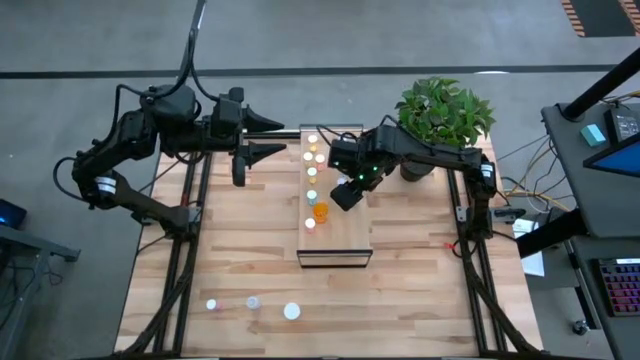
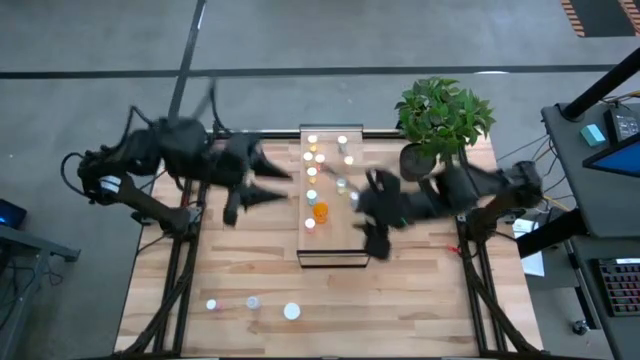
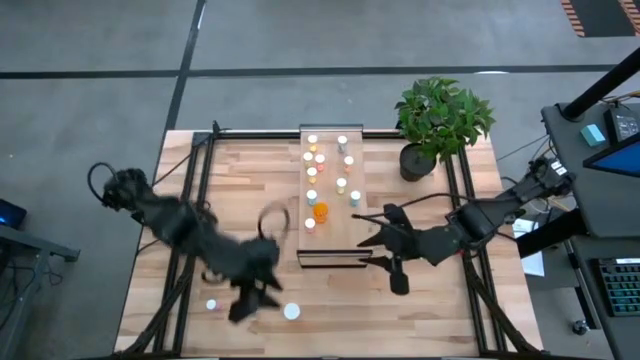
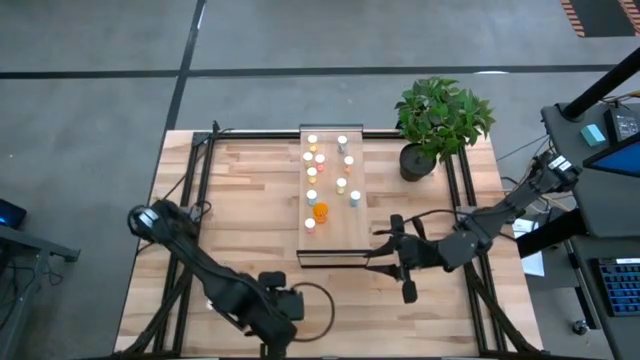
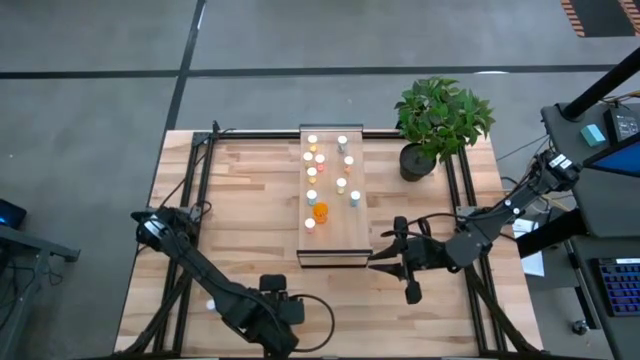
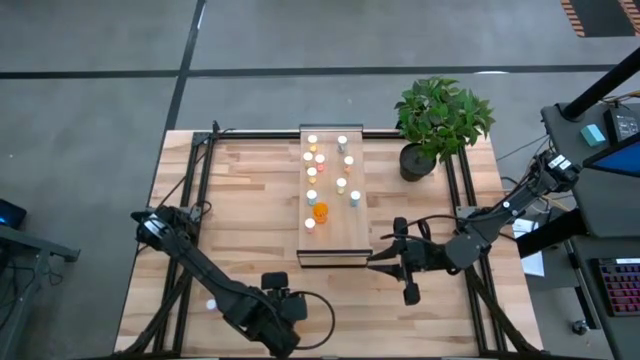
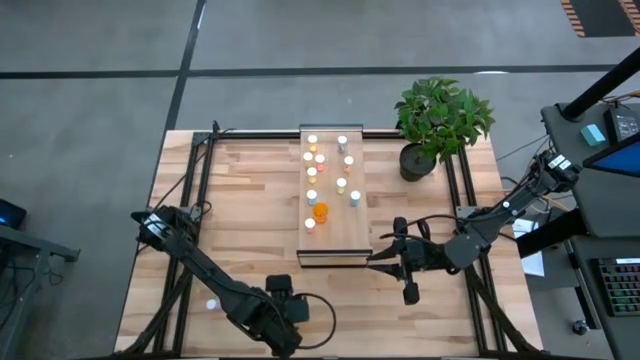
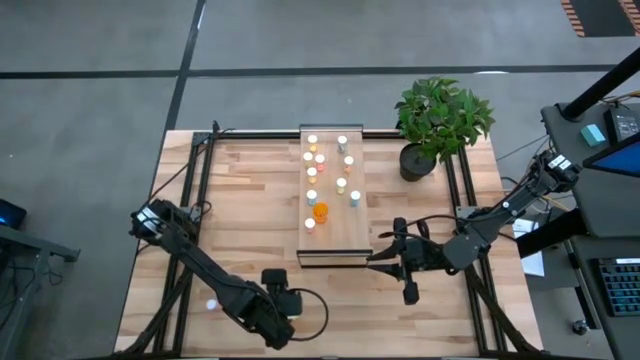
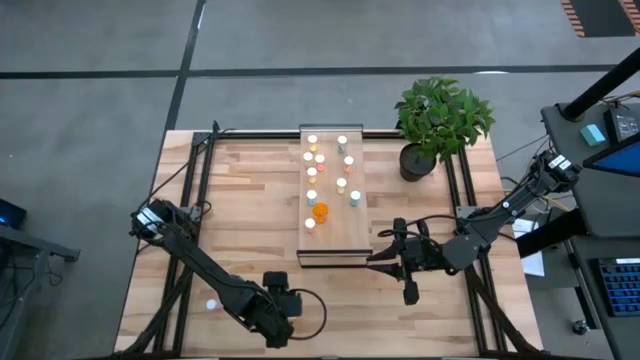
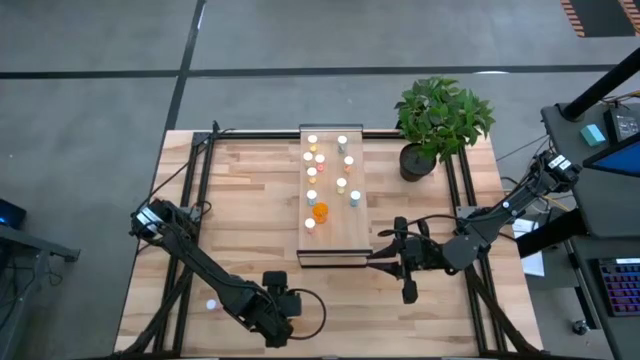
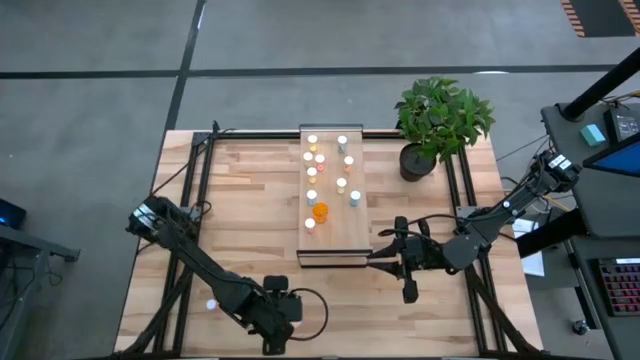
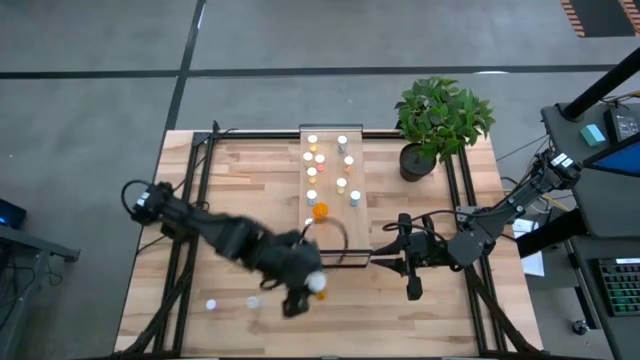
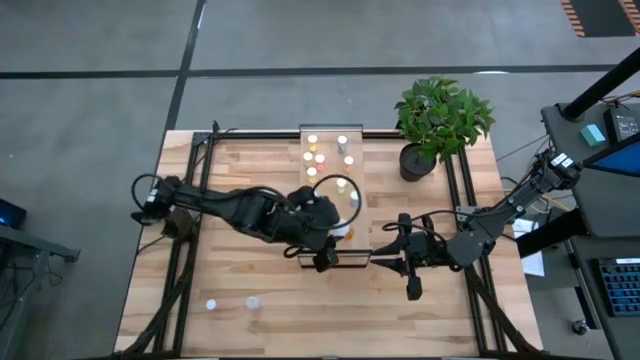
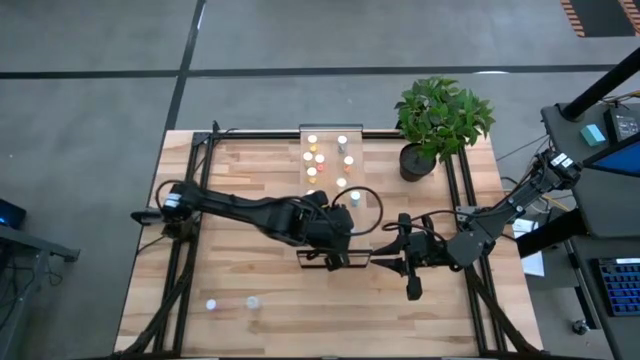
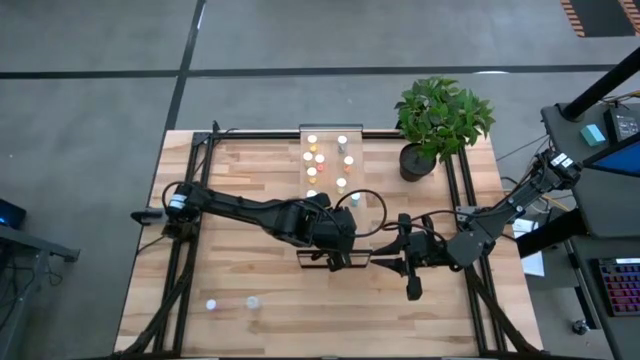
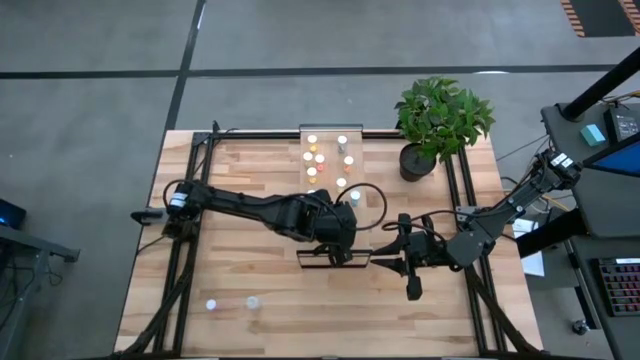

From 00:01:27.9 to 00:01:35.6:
Task: Pick and place medicine bottles onto shelf by color
Put the orange bottle on the shelf

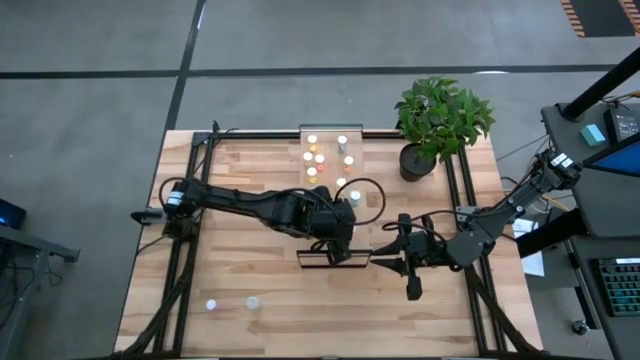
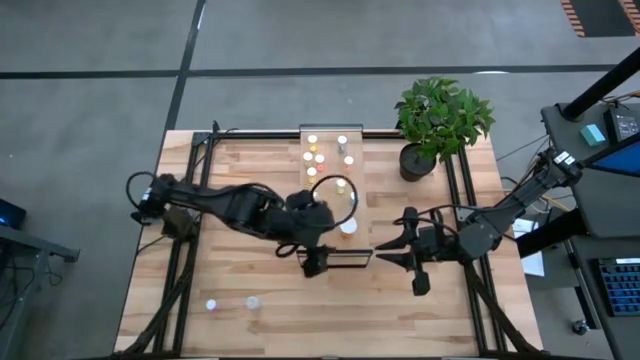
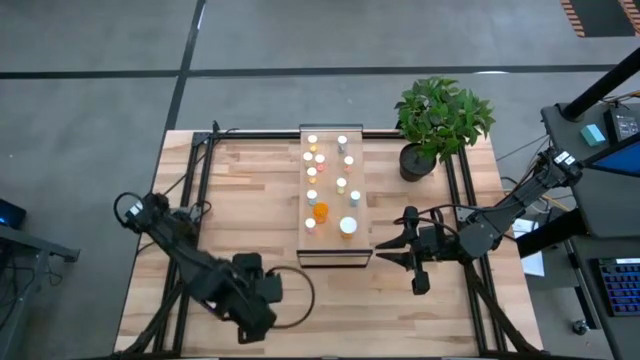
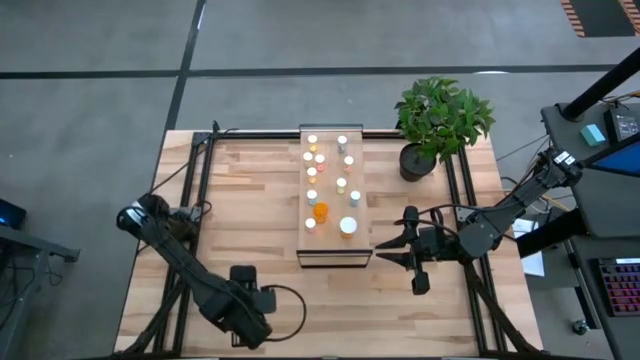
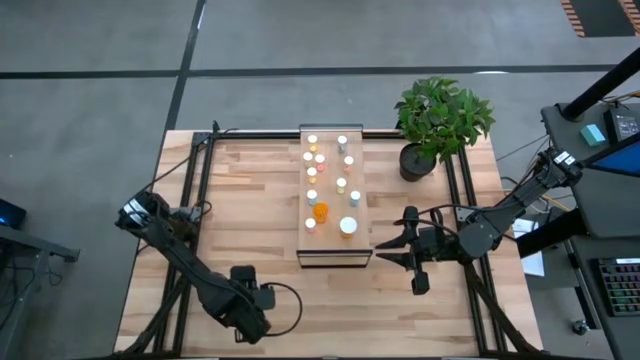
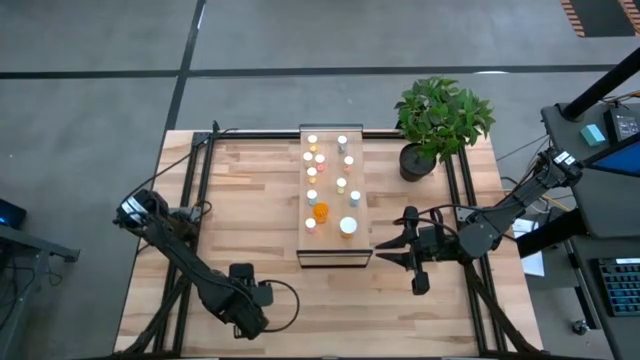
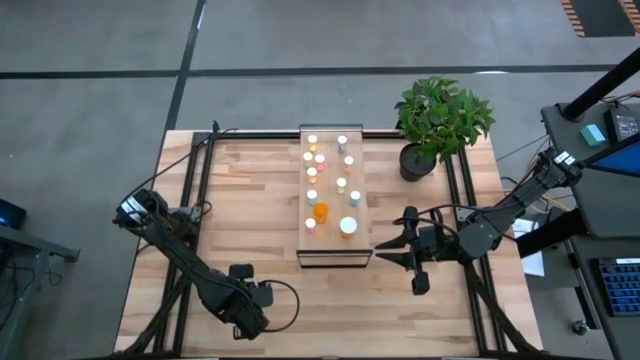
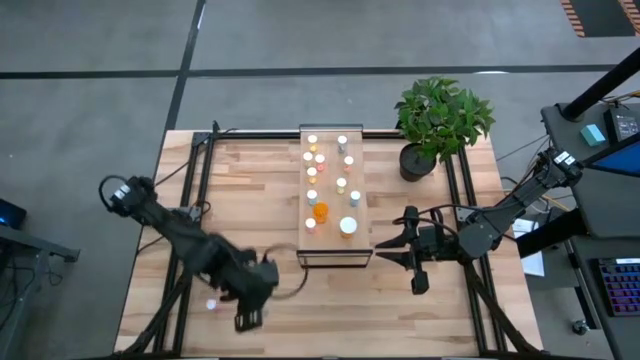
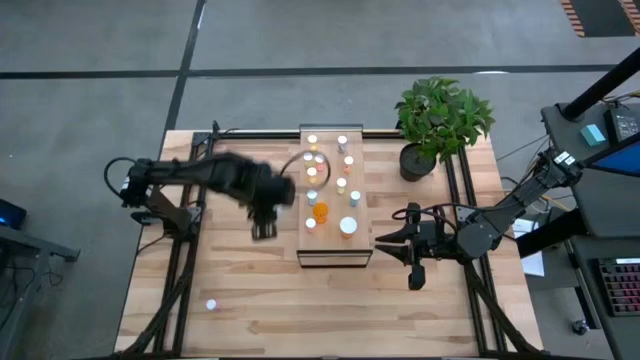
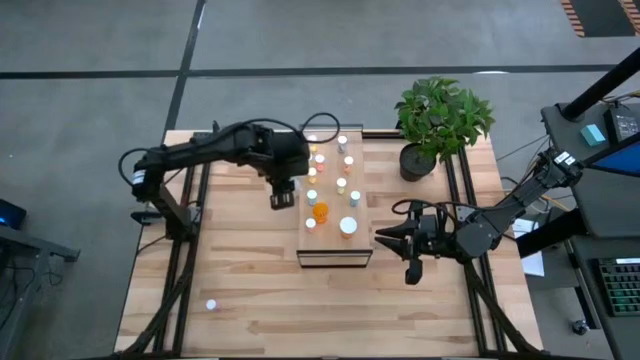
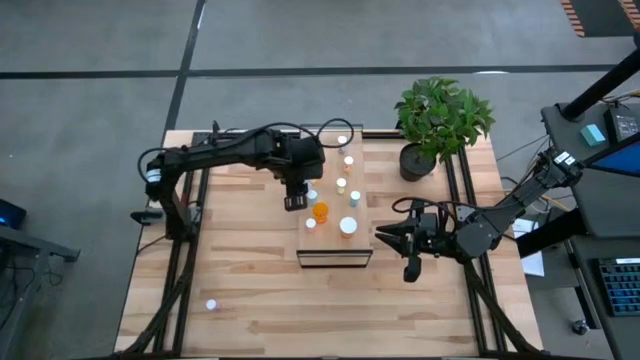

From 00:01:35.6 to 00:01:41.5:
Put the transparent bottle on the shelf

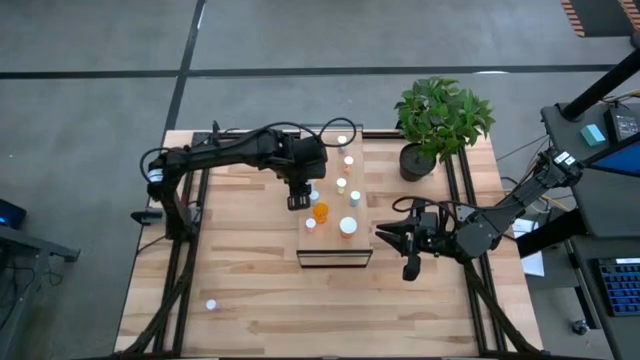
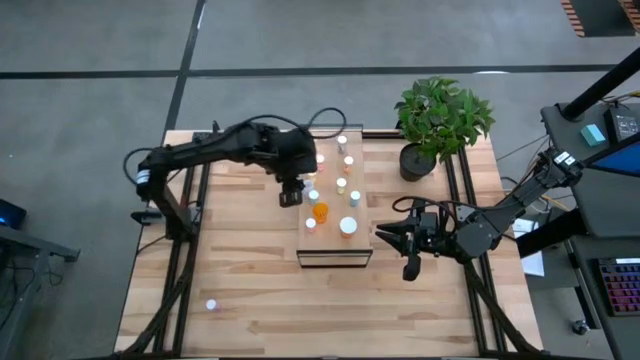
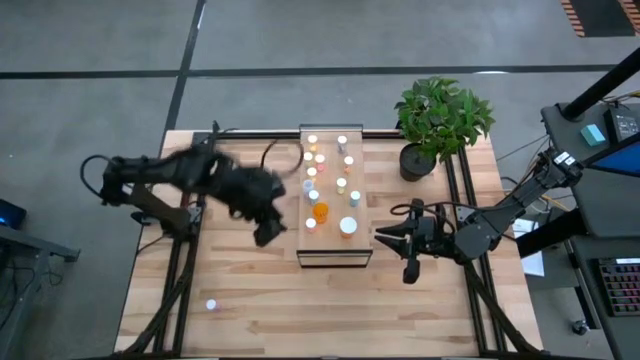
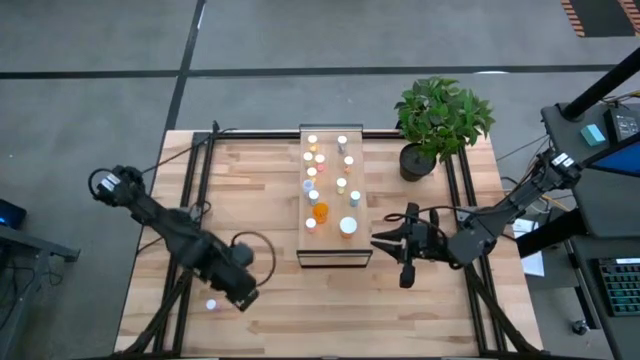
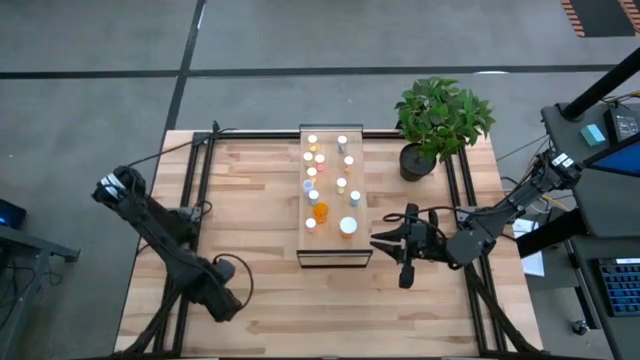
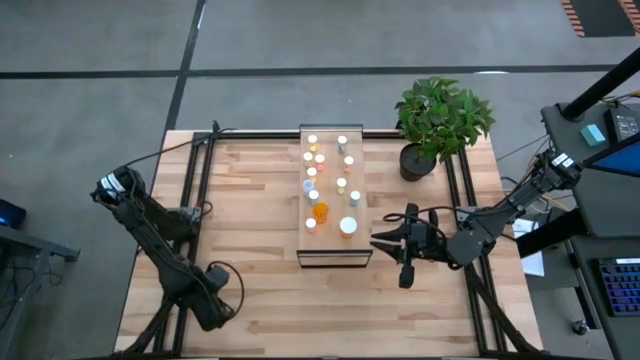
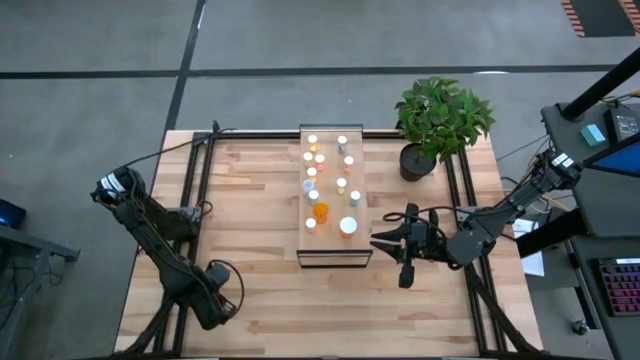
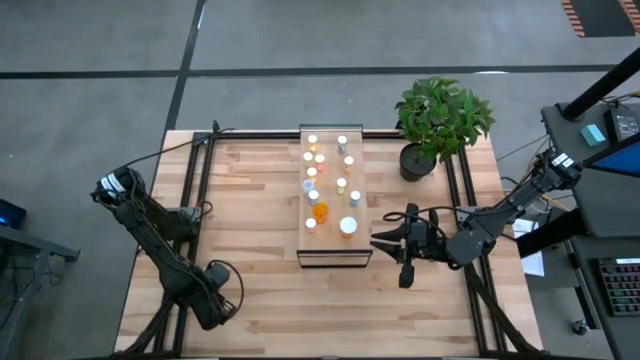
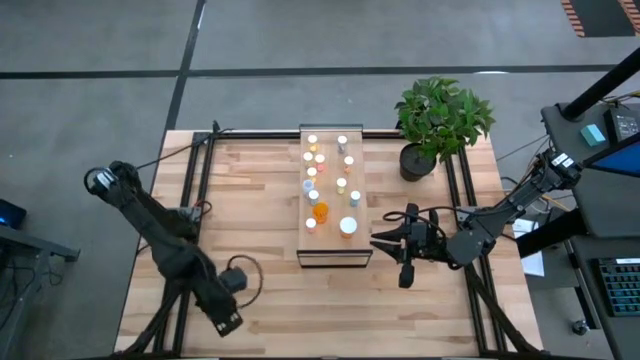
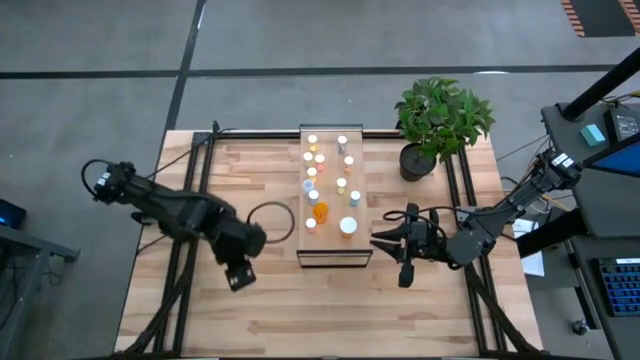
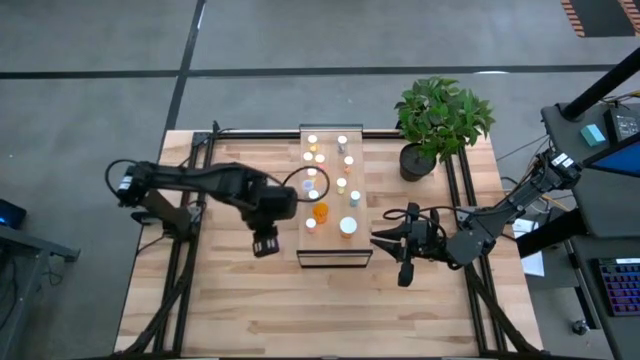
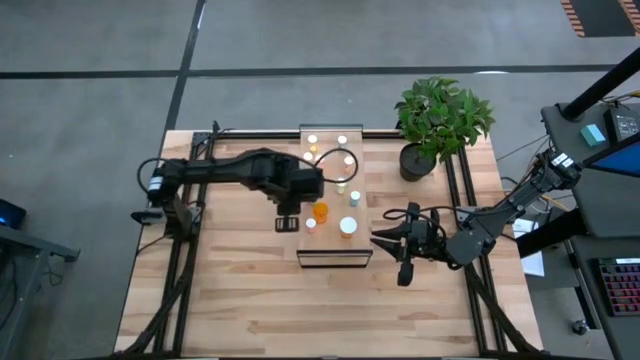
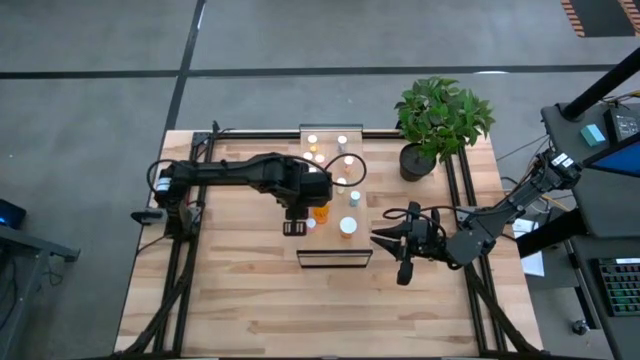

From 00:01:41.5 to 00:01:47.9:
Put the pink bottle on the shelf

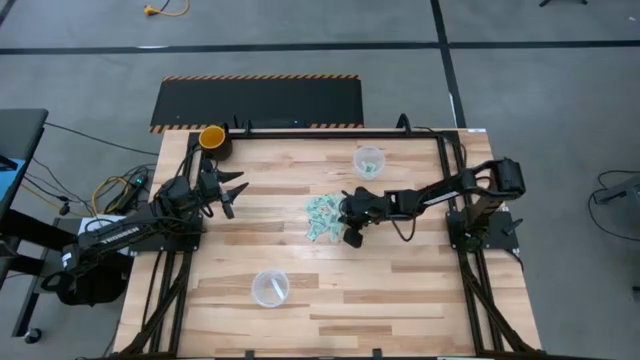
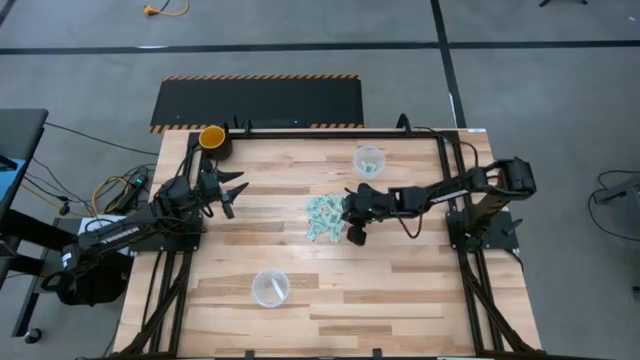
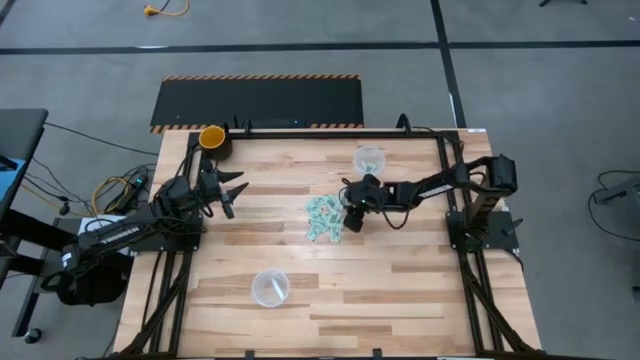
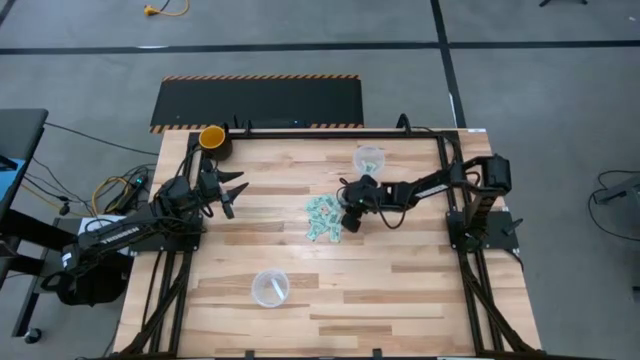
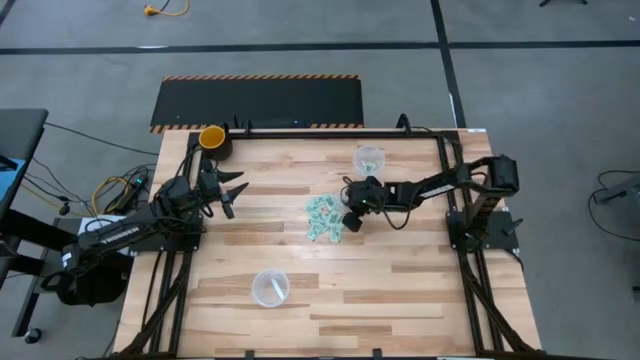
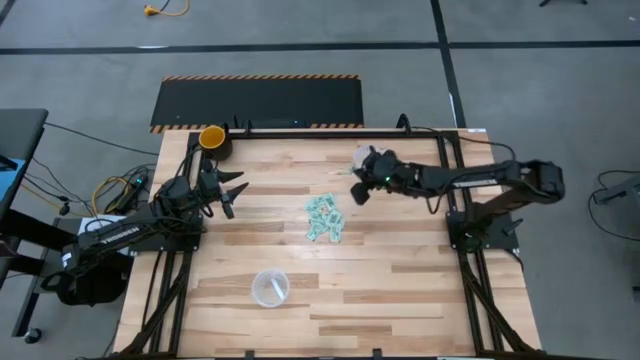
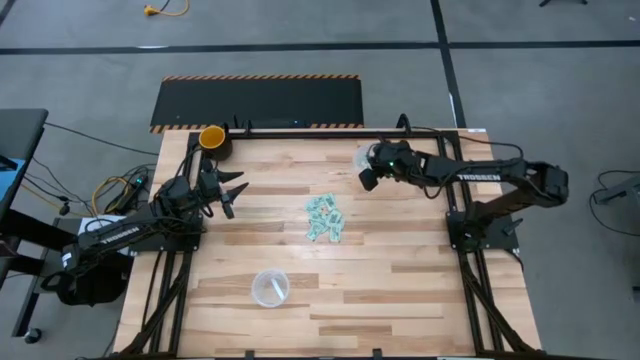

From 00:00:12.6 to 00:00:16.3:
Task: Pick and place Stevia / Truvia into bins
Put the stevia packet into the top container
